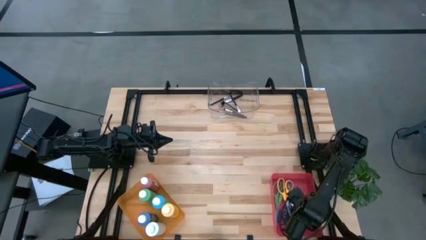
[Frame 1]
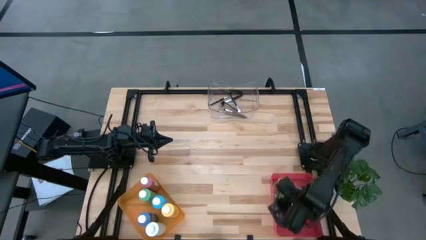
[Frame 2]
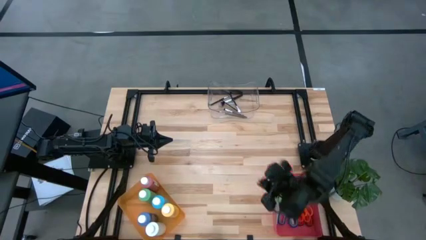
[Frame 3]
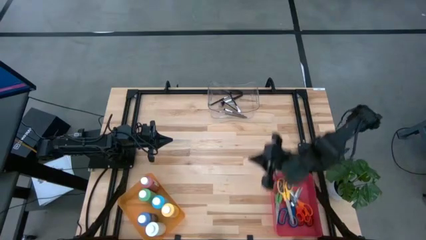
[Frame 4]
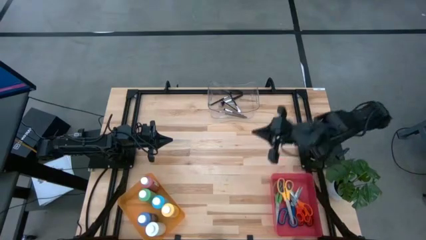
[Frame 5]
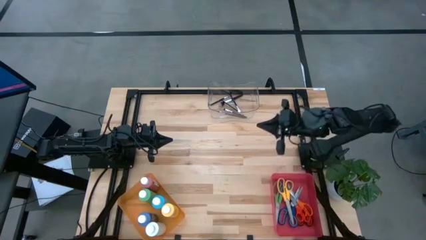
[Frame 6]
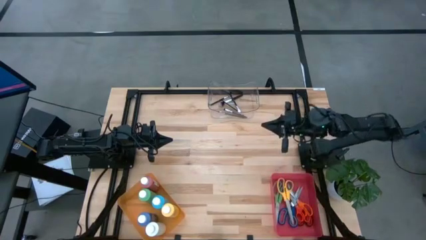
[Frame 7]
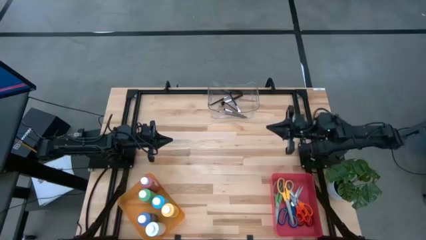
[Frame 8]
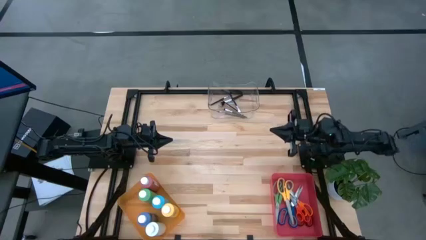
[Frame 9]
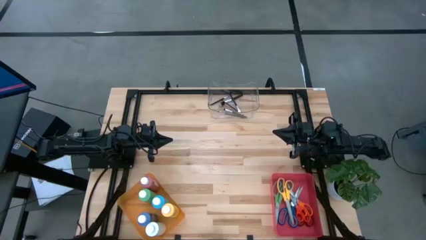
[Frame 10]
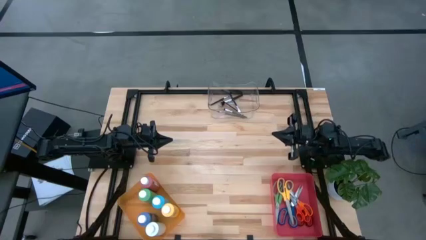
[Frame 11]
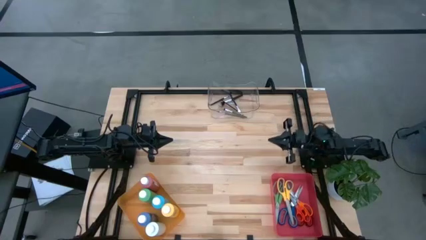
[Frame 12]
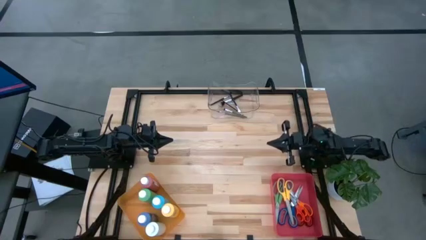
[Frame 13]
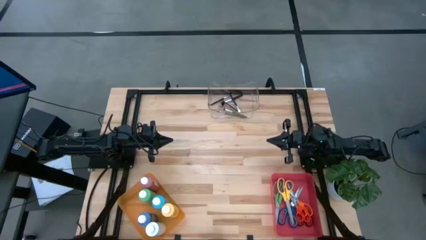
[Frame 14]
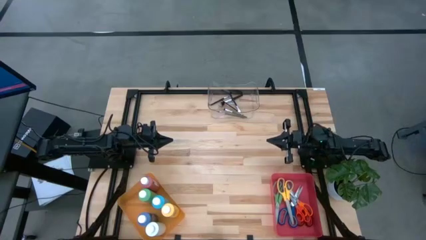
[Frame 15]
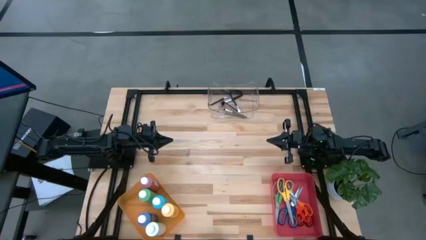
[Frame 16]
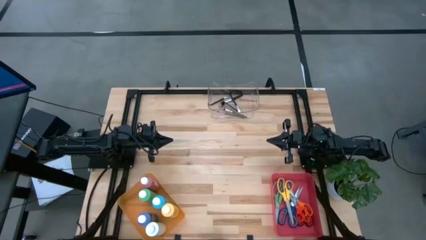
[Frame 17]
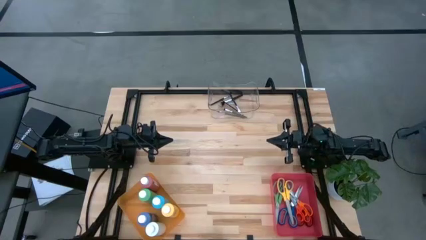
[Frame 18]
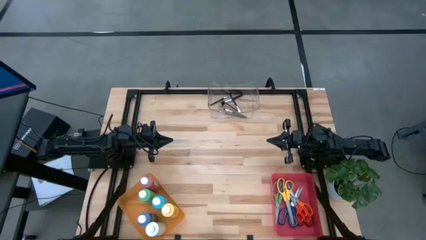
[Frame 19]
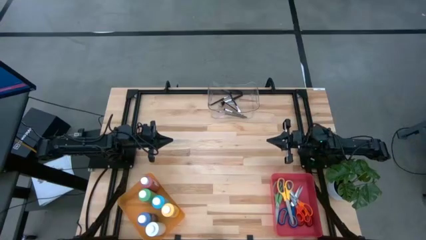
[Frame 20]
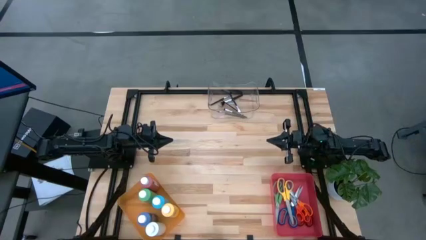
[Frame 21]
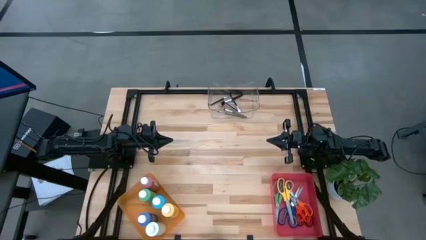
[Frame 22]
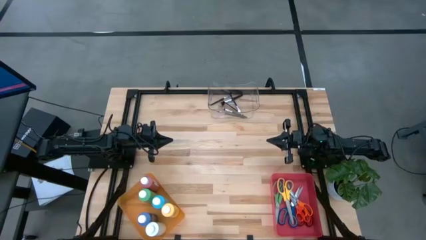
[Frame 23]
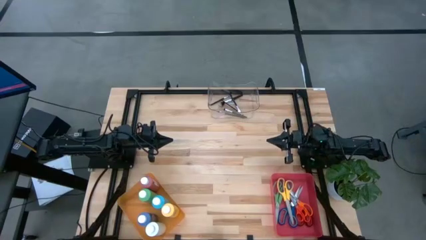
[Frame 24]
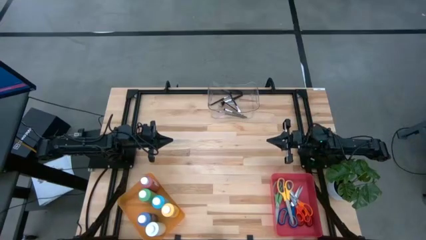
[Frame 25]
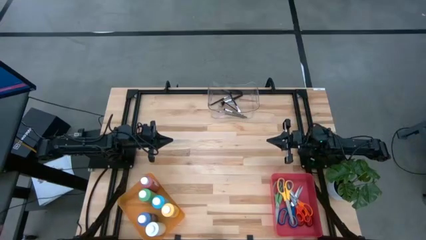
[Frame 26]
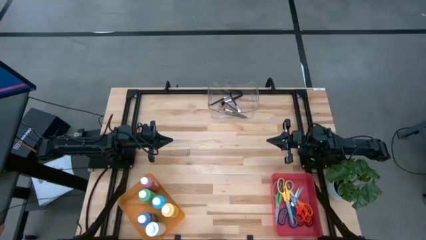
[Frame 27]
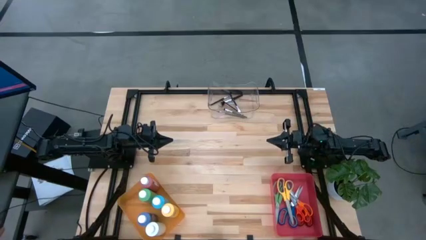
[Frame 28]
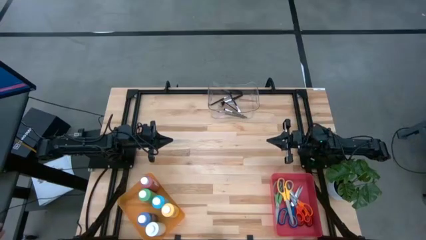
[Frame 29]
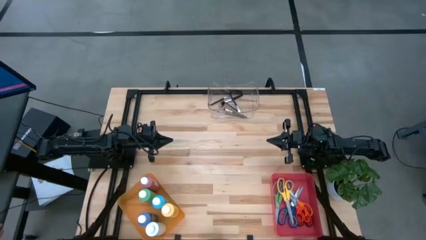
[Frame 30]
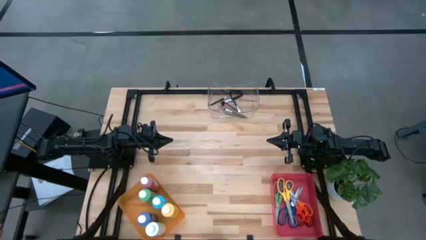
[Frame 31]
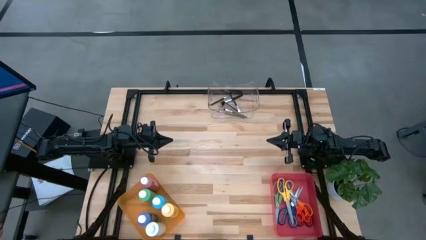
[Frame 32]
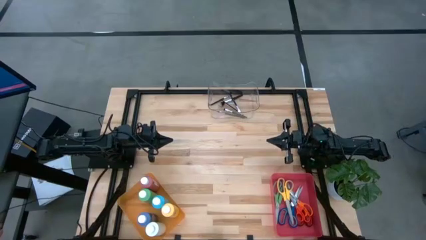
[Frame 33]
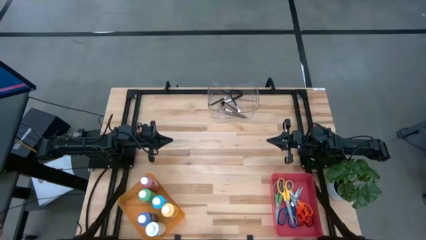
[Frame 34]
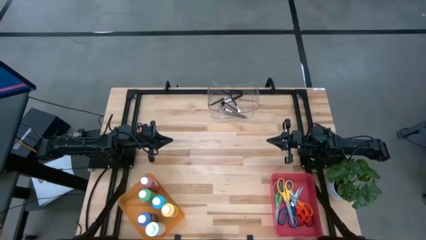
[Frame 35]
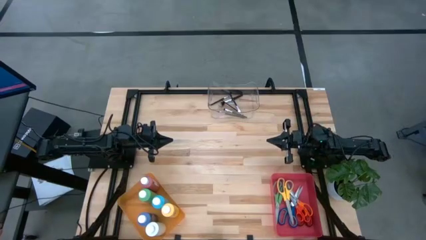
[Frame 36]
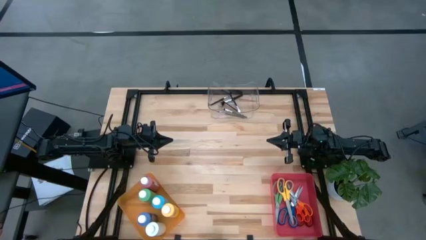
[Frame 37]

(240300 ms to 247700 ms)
Task: Pick & Place Paint Supplies
Return to Home Position

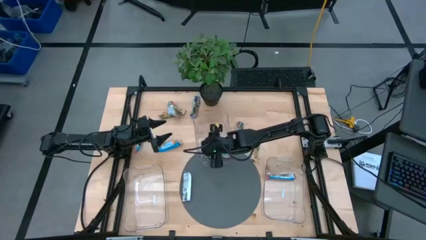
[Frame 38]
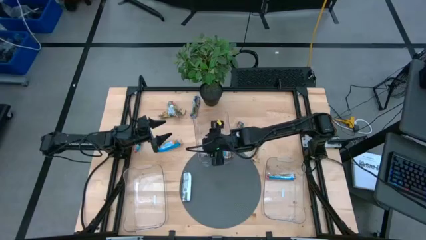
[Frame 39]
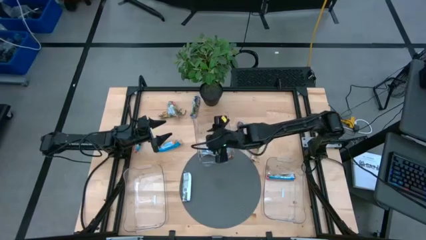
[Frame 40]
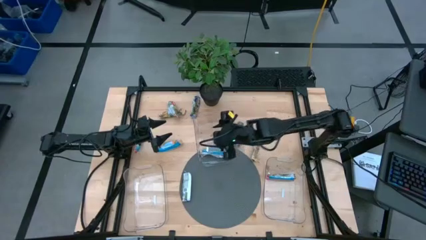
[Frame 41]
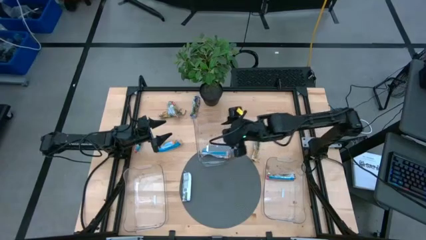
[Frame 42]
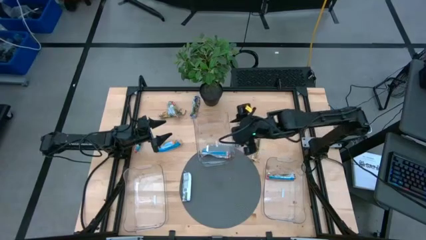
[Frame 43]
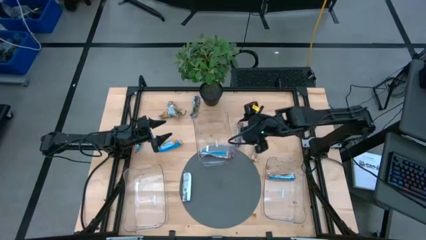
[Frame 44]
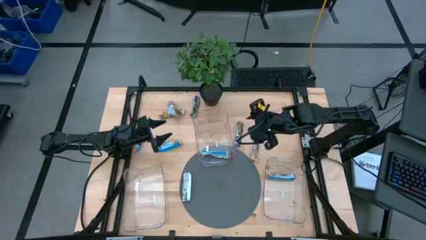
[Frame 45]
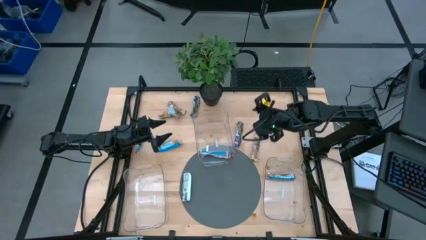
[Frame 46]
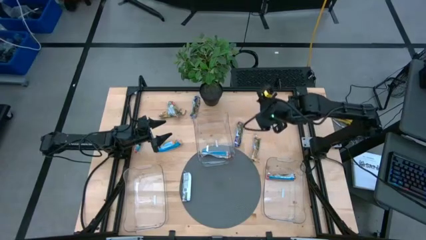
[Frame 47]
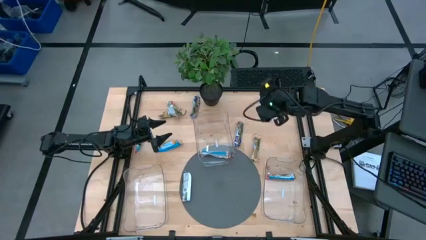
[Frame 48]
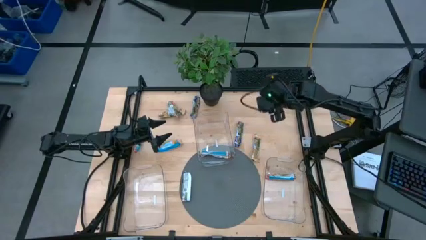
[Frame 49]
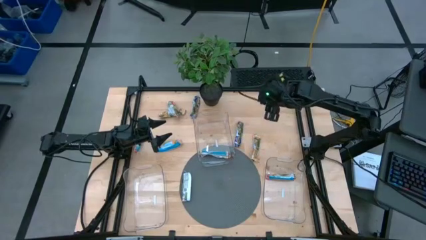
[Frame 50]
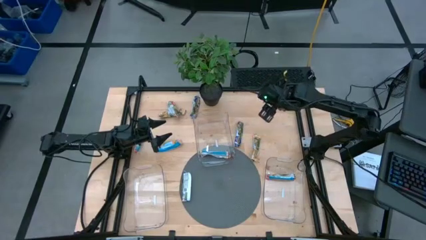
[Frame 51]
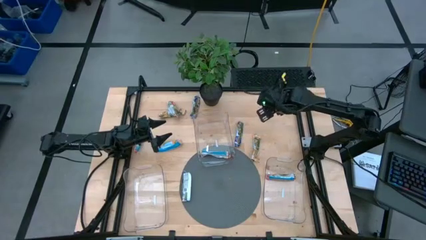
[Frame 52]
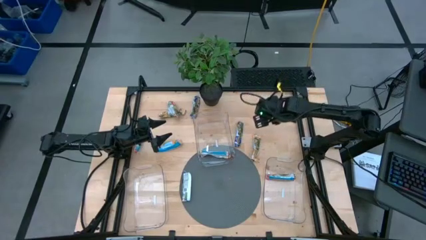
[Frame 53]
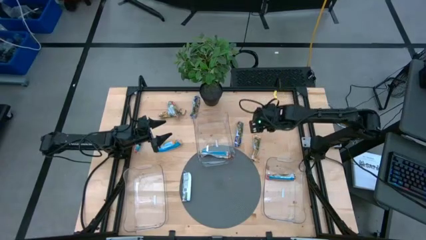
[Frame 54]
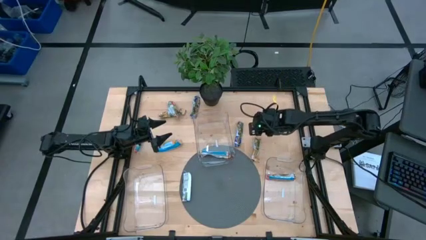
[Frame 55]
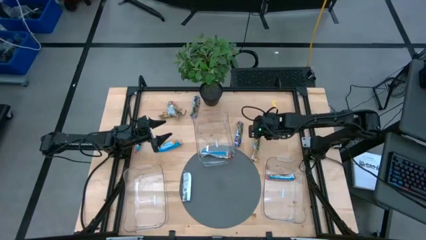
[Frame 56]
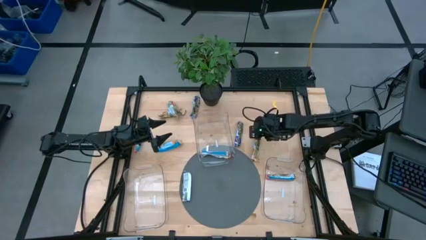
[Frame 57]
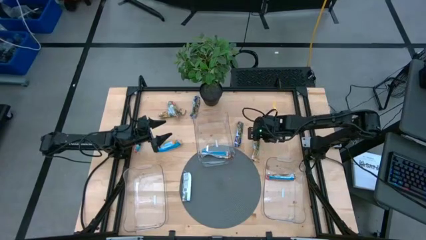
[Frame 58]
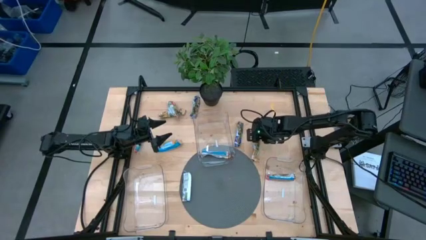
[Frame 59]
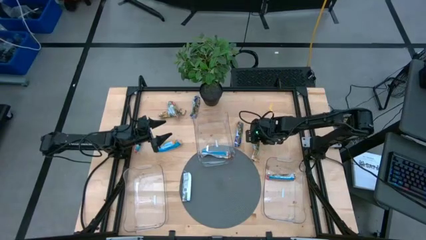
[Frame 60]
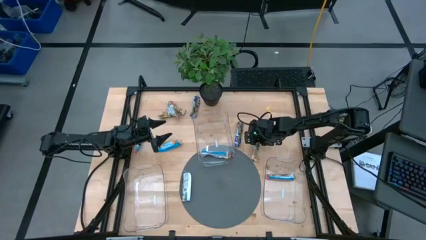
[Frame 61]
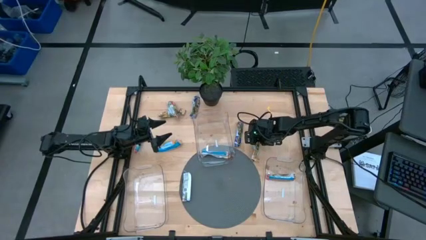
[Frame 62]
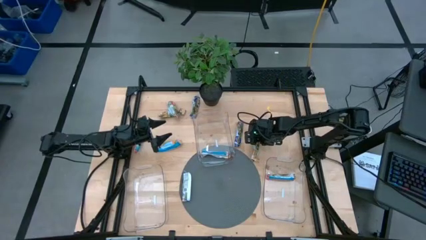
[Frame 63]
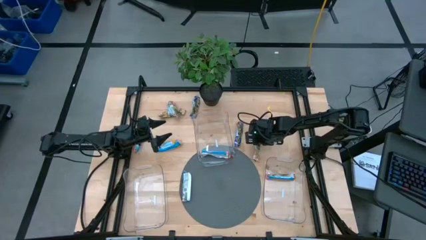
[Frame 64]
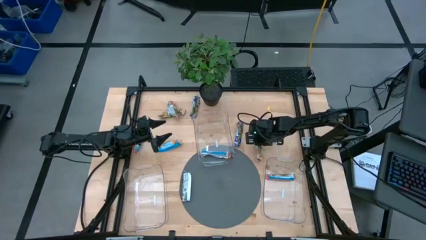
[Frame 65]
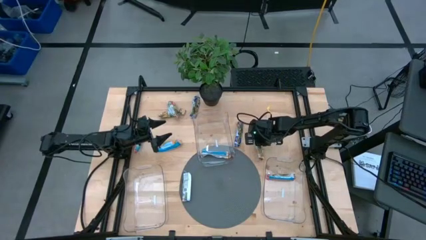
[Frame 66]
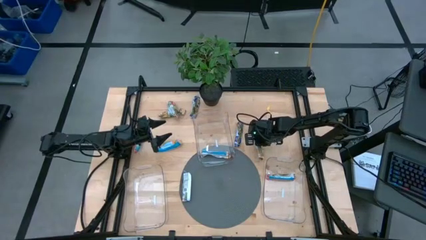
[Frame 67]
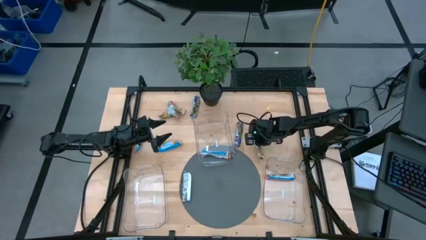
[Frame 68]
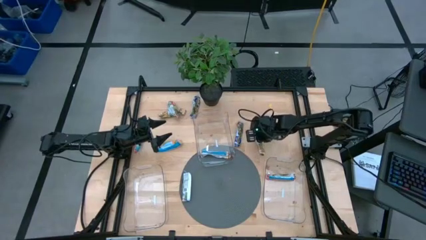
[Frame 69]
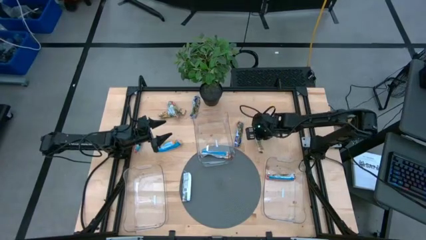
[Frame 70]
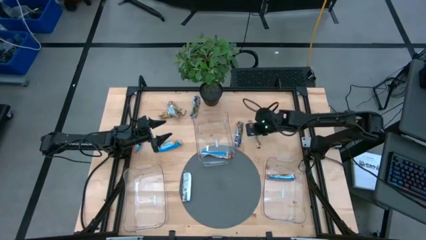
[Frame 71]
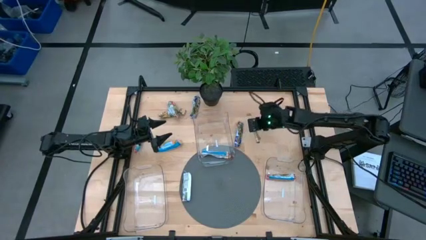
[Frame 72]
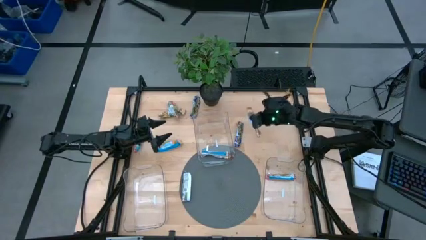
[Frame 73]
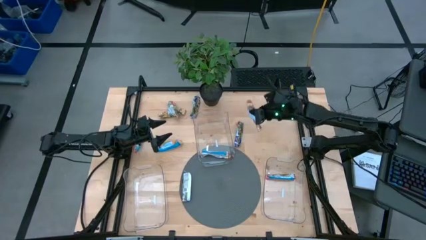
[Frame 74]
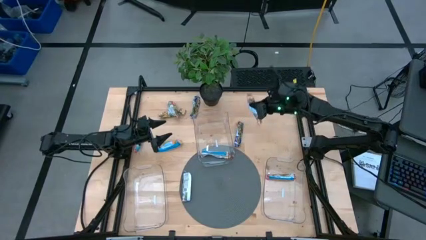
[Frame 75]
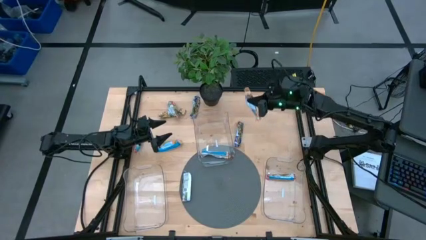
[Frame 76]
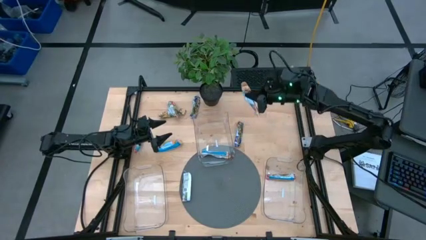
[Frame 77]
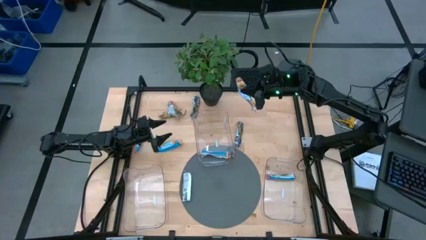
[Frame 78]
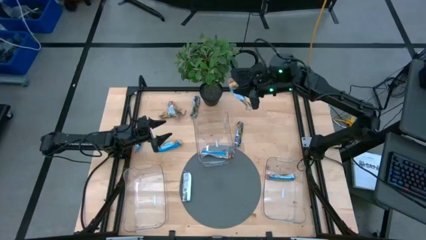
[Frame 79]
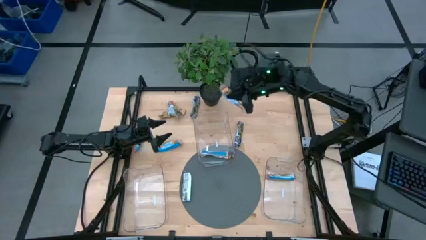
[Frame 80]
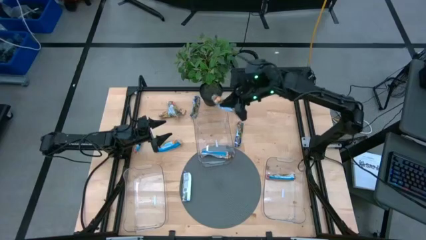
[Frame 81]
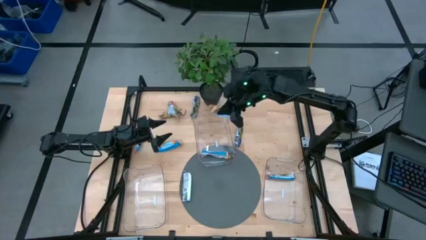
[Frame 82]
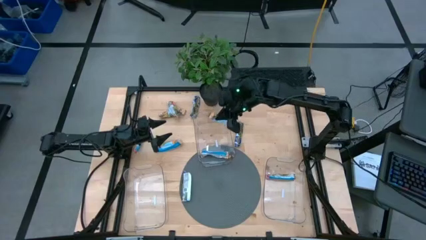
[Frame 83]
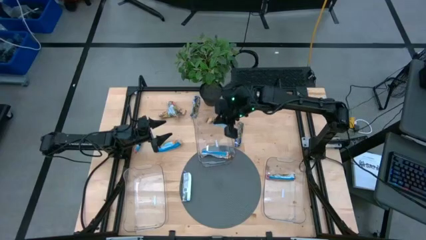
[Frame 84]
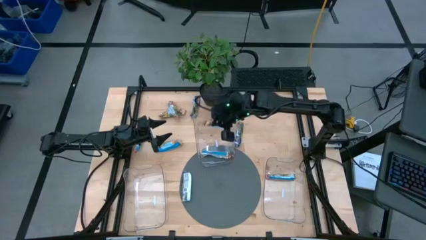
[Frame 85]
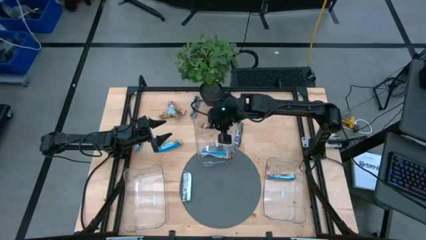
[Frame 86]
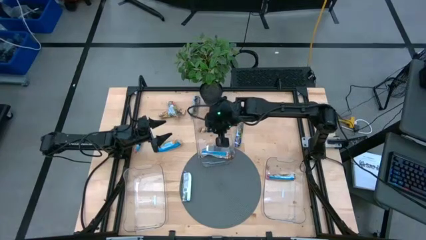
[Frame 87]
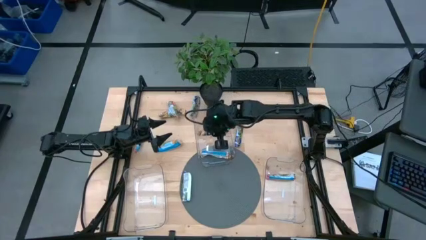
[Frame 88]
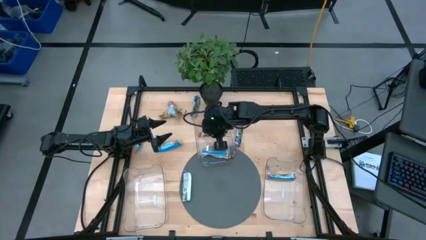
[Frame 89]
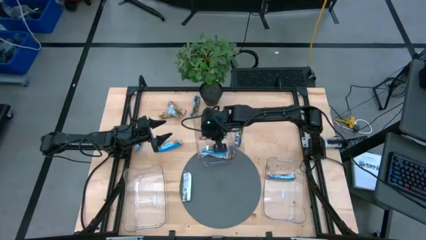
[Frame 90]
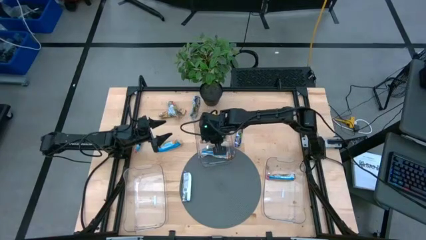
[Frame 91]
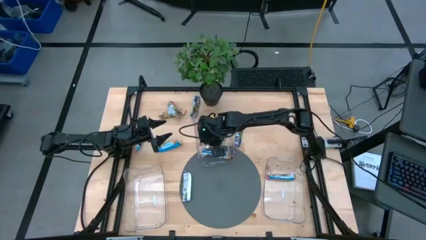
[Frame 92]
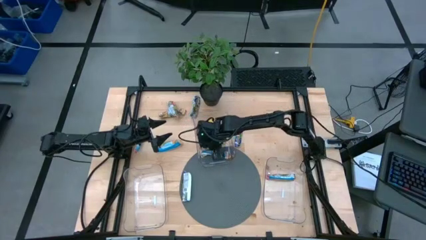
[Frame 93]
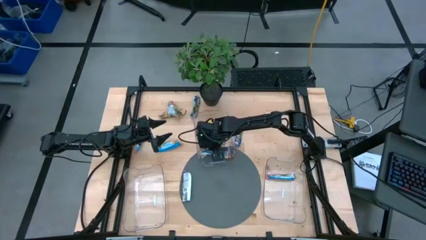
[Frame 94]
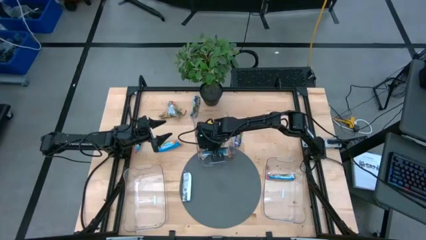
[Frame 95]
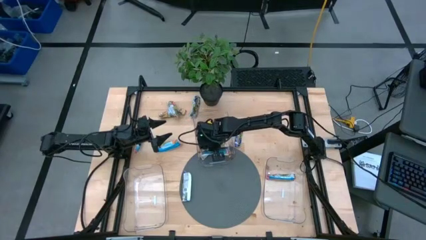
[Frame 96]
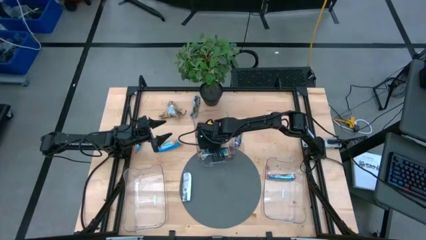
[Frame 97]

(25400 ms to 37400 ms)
Task: Pick and place Granola Bars by type
Put the right yellow granola bar into the middle transparent bin
